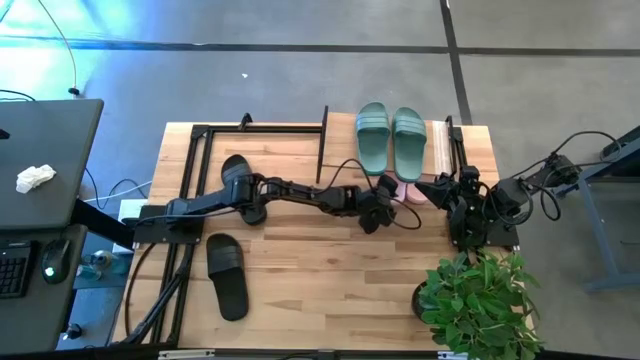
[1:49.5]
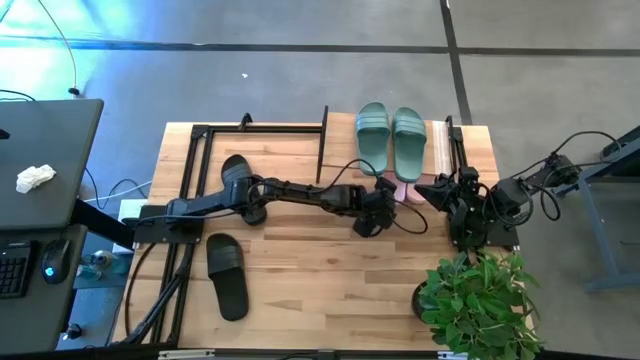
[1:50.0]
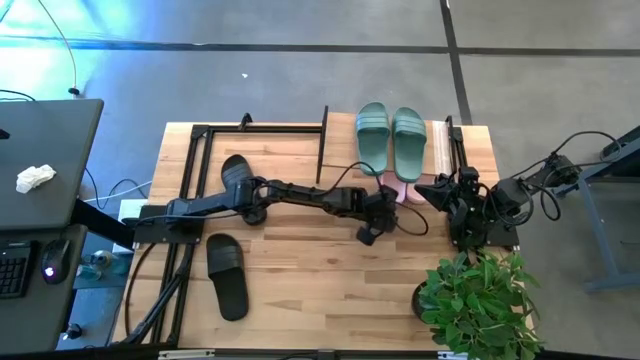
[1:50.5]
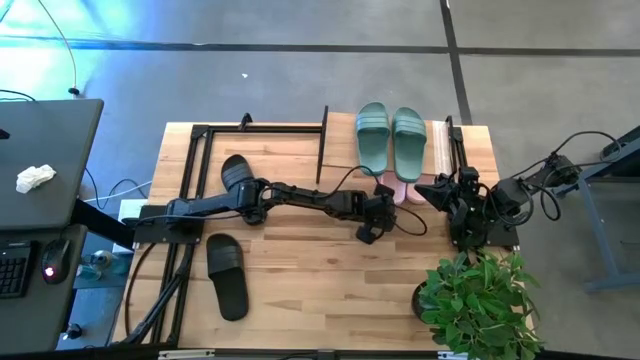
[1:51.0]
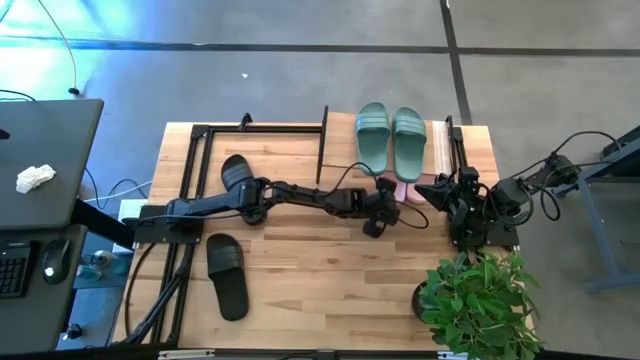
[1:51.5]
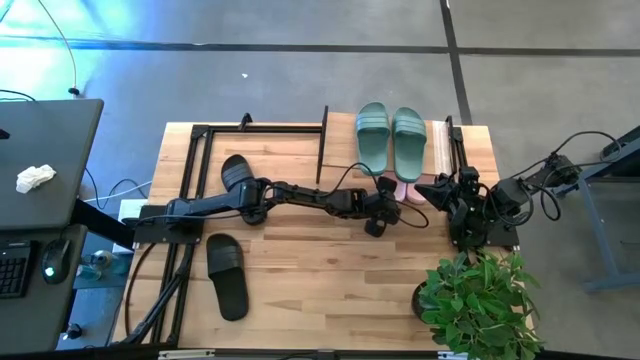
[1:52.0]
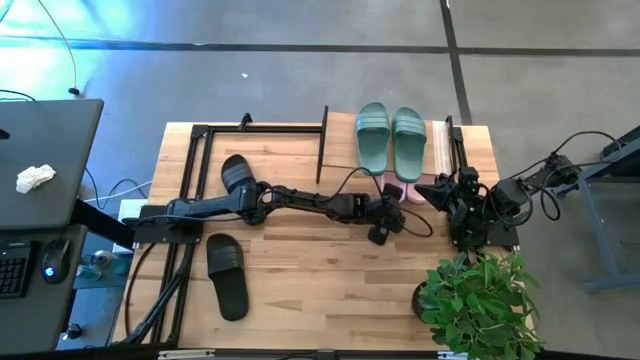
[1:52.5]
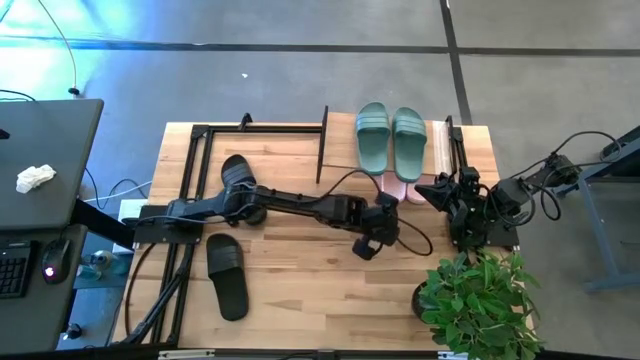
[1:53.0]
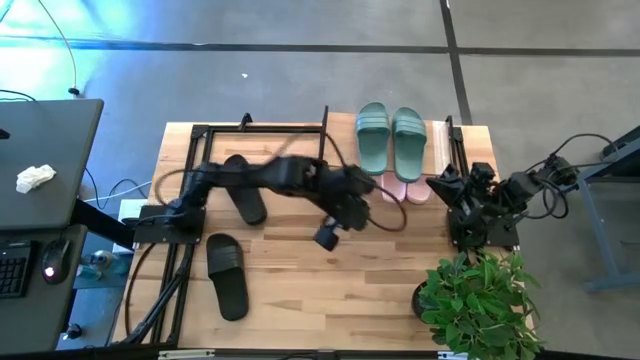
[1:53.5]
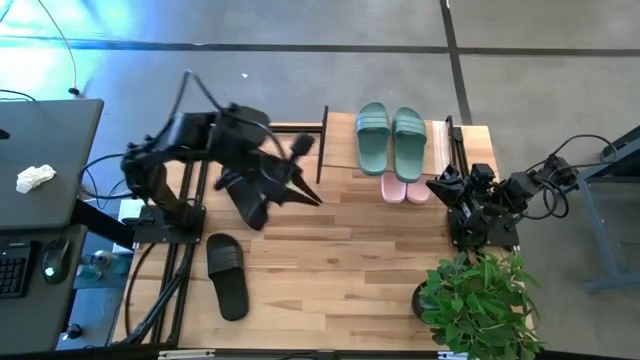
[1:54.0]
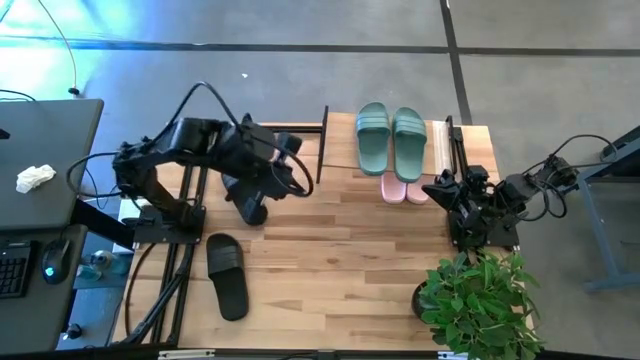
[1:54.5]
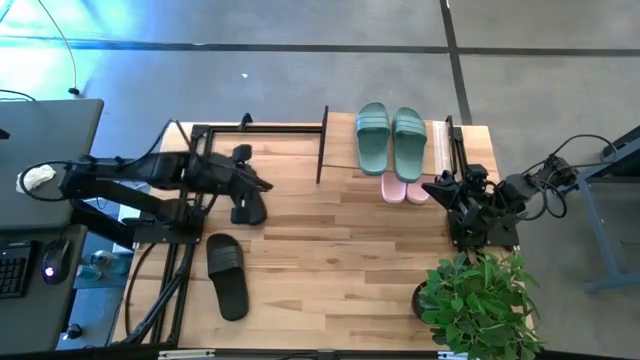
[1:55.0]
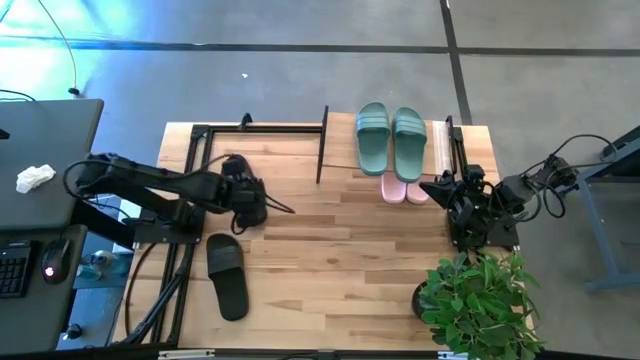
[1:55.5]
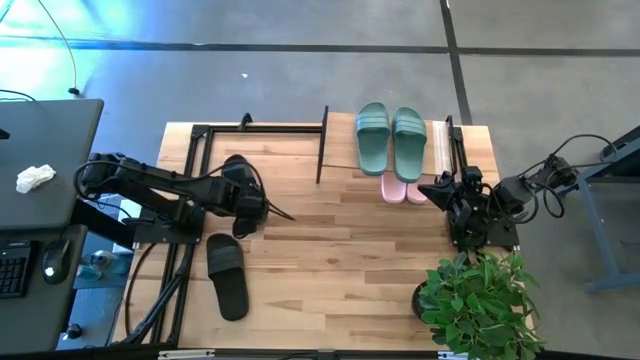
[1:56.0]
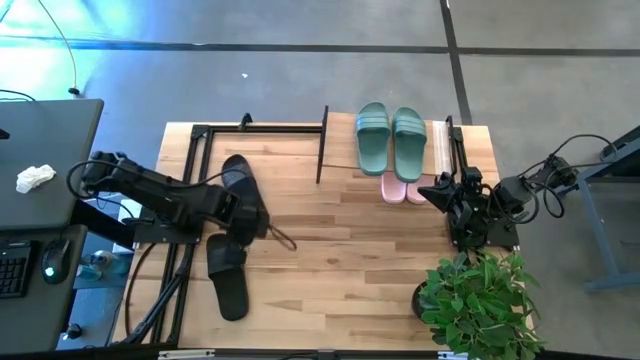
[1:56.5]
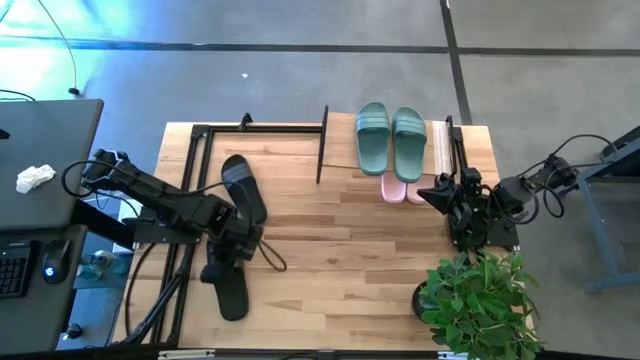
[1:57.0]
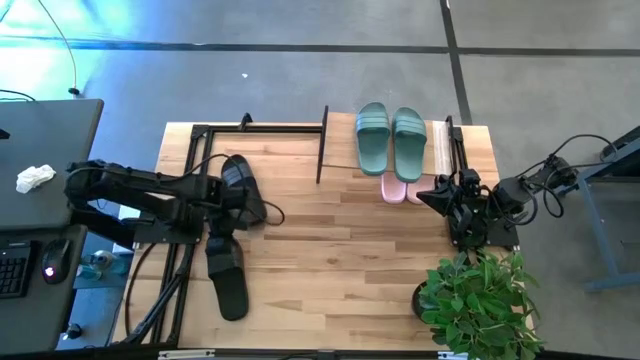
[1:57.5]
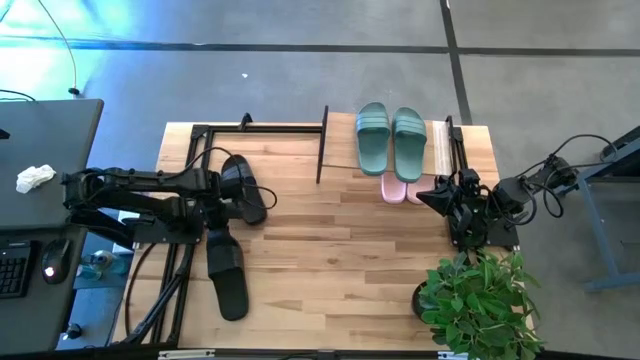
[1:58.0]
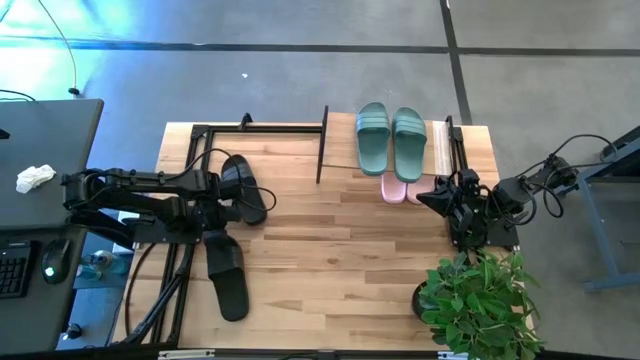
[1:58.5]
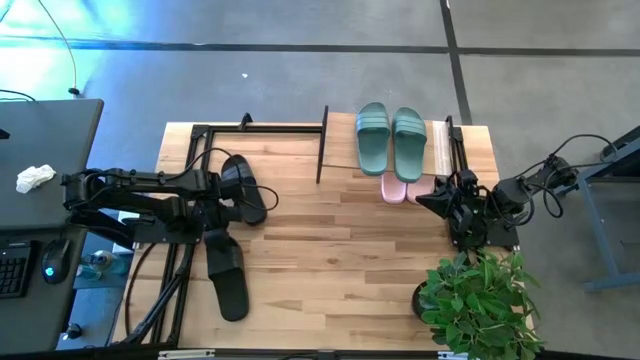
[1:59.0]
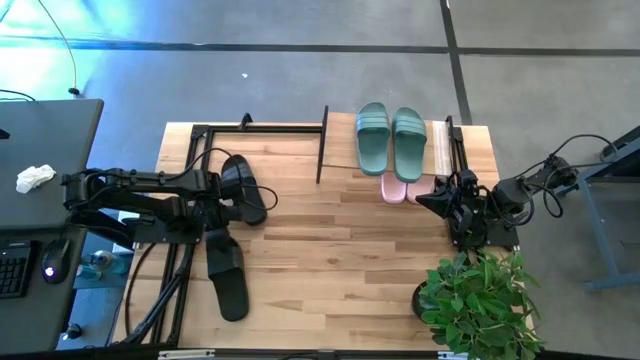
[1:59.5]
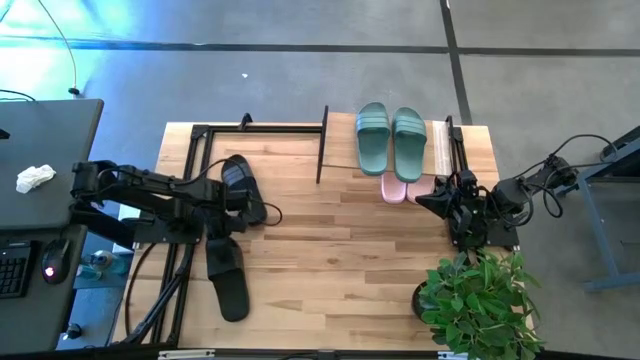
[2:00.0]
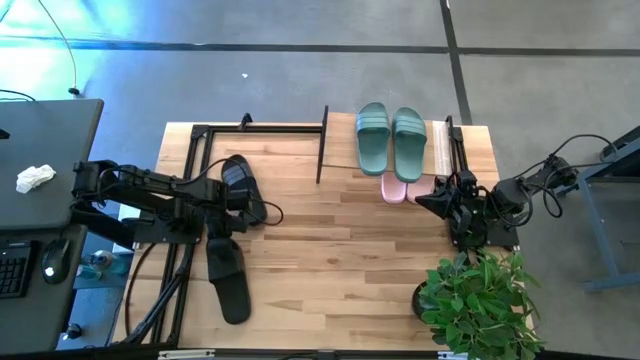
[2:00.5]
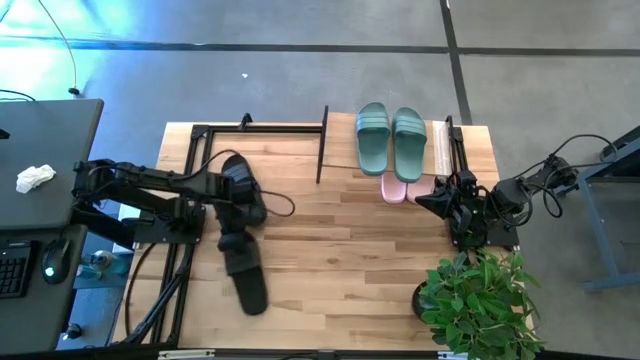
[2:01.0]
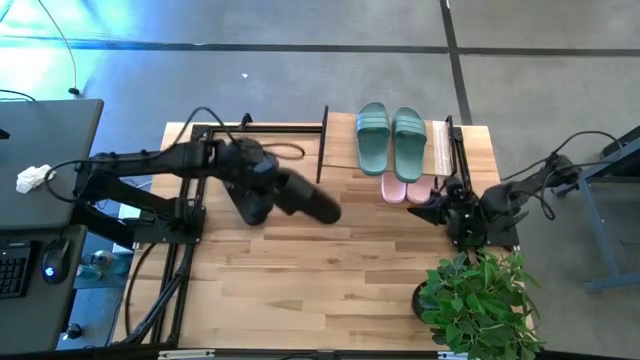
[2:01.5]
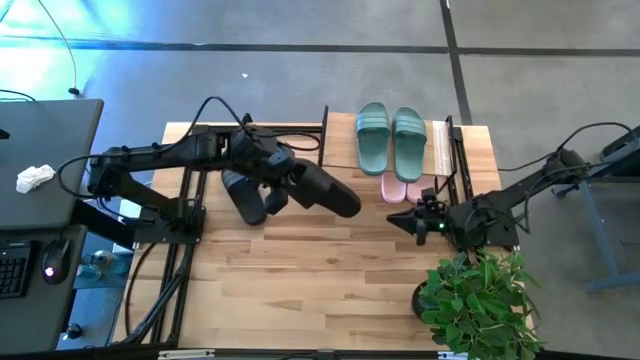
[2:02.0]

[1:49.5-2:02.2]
Task: Pick and place slides into the shelf
Put the bottom black slides under the shelf

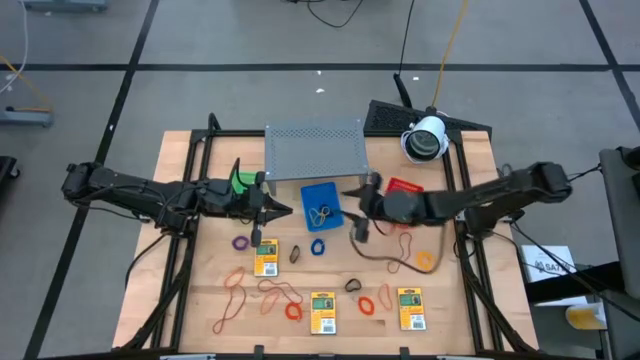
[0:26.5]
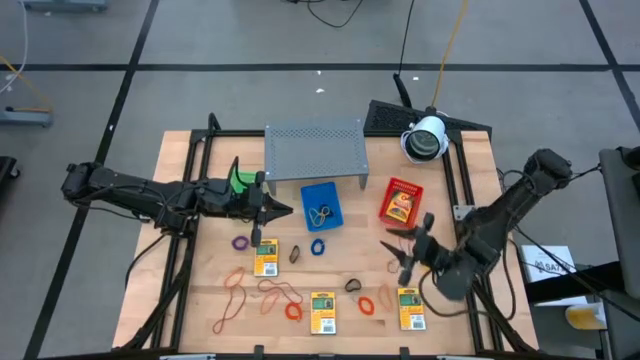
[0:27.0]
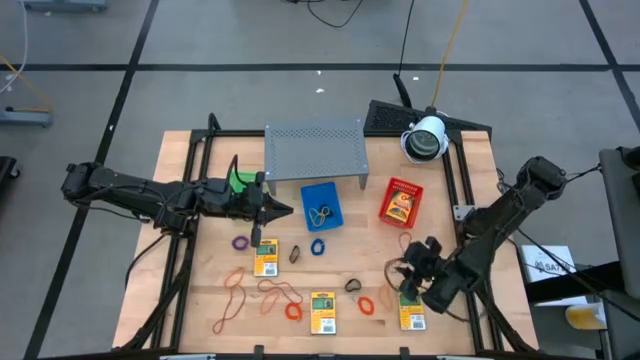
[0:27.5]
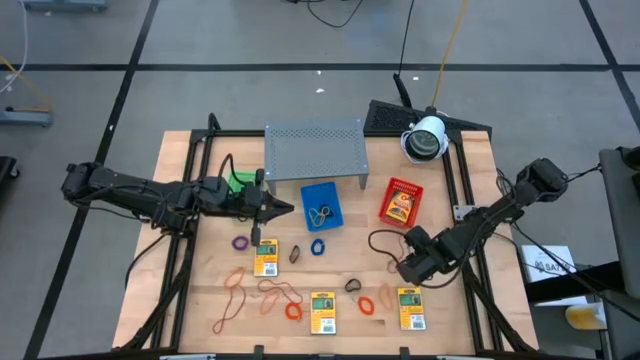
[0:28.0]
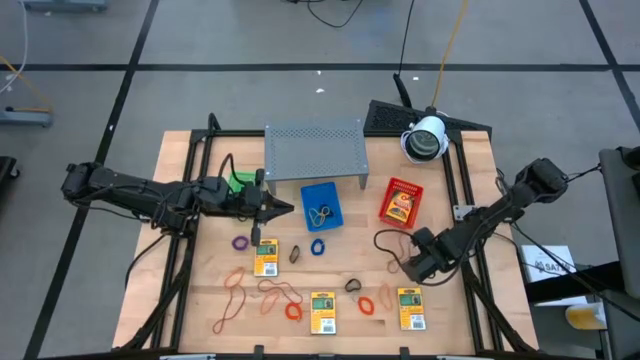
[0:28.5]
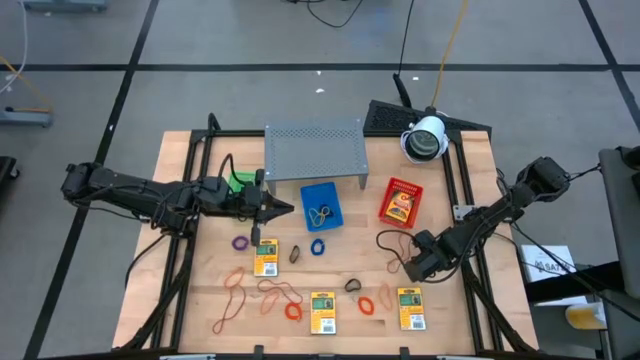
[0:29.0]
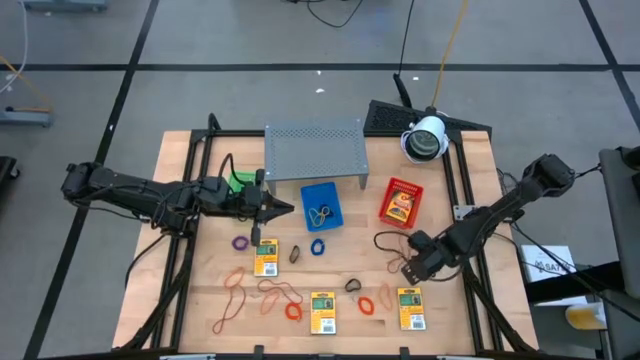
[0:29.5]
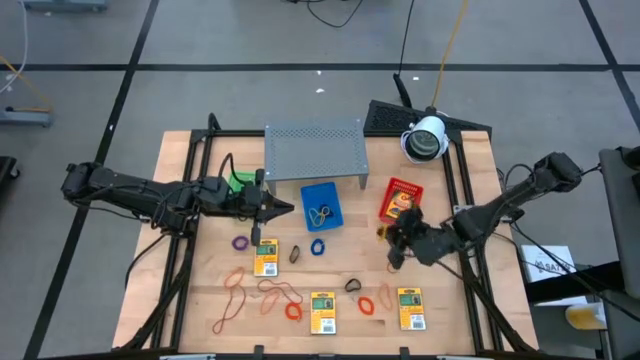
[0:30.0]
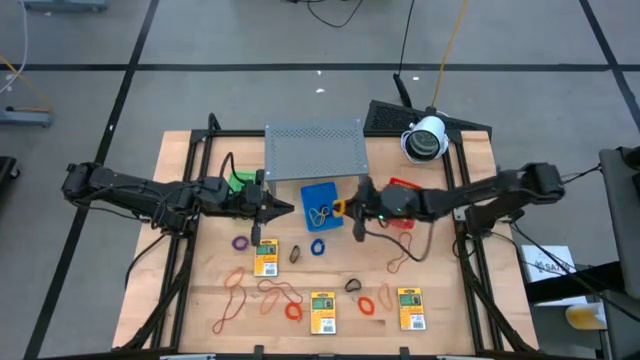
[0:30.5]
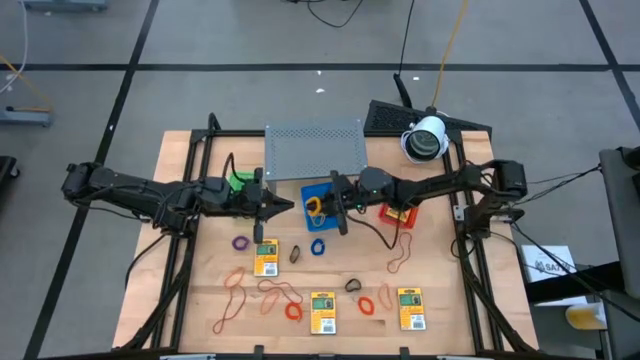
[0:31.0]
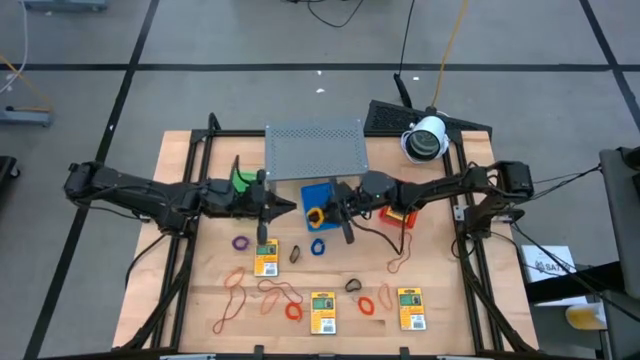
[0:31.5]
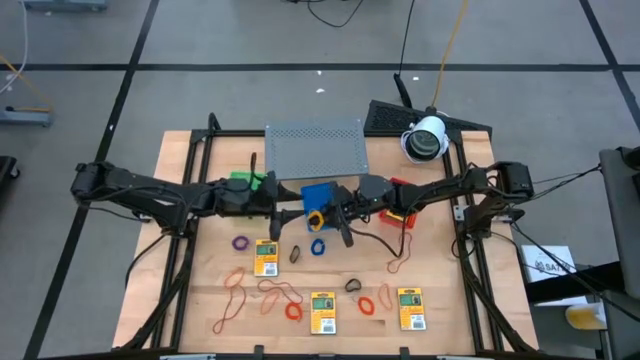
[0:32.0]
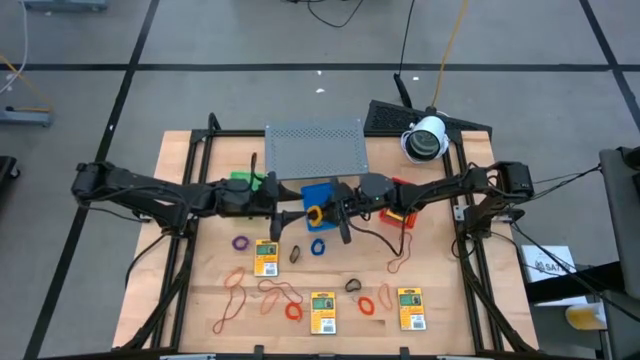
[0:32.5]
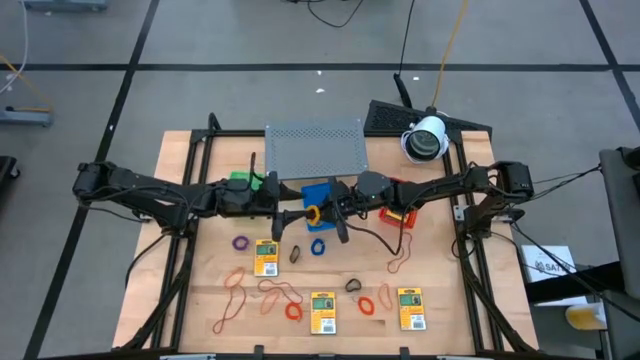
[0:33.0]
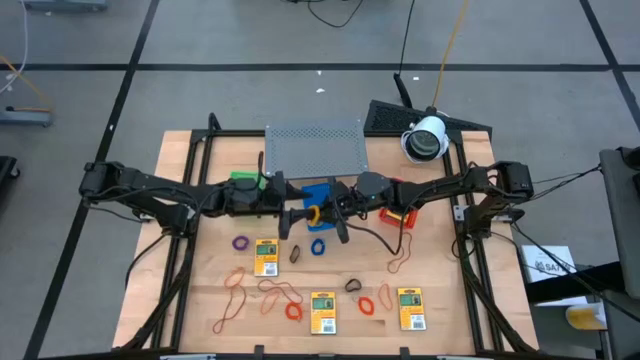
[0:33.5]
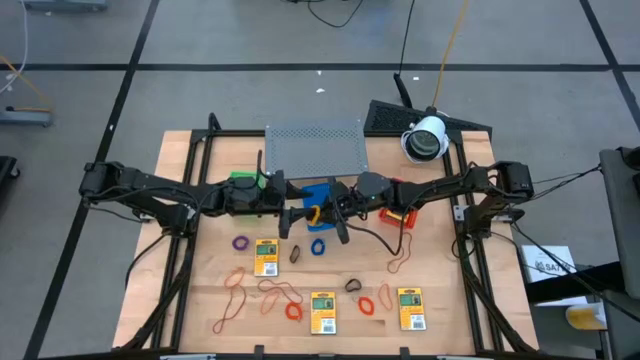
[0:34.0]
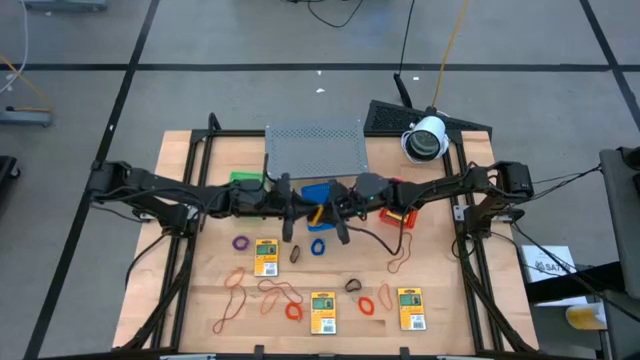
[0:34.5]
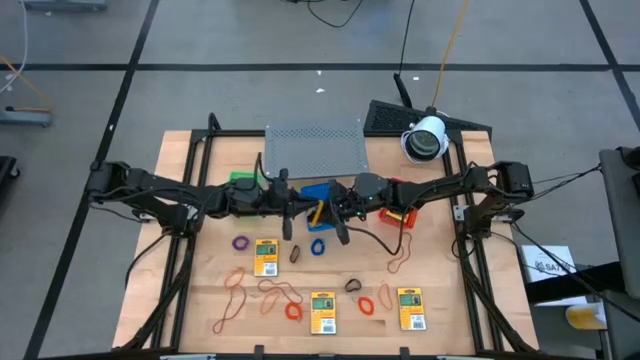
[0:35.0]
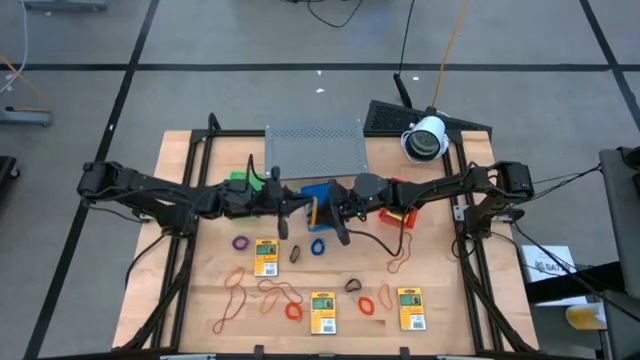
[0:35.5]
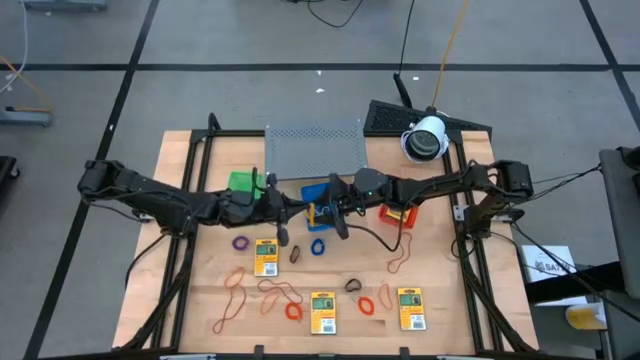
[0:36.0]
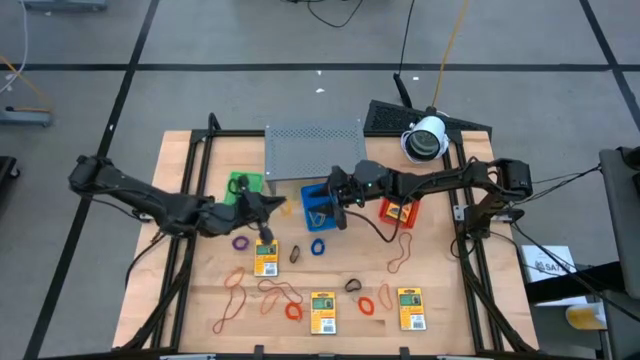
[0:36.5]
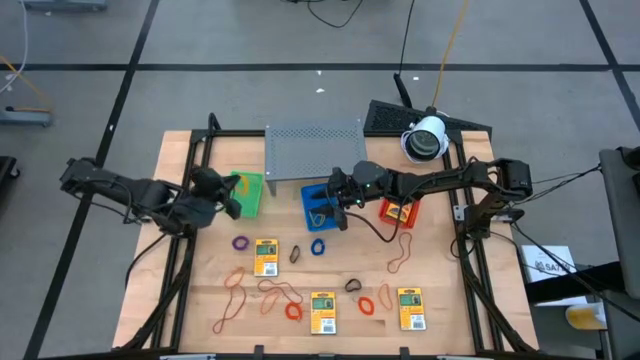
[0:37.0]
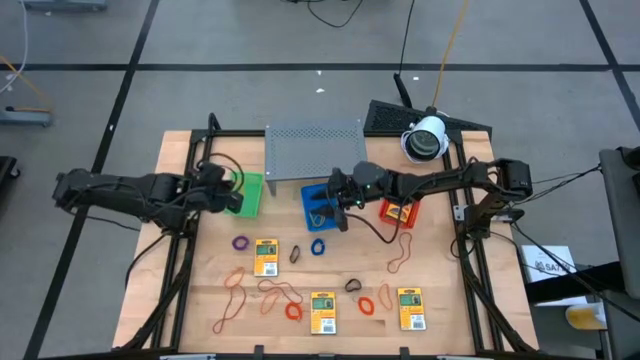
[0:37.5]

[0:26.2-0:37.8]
Task: Pick & Place Office Desk Supplies
Put the yellow spring keychain into the green bin
